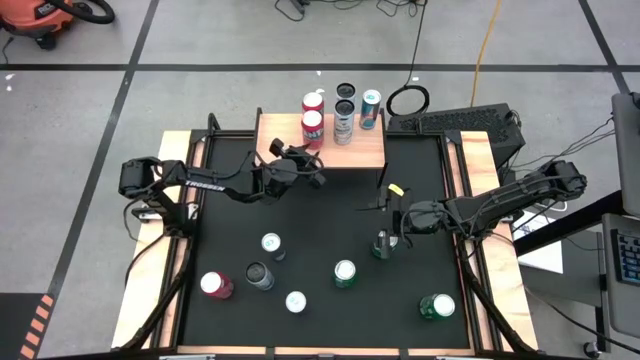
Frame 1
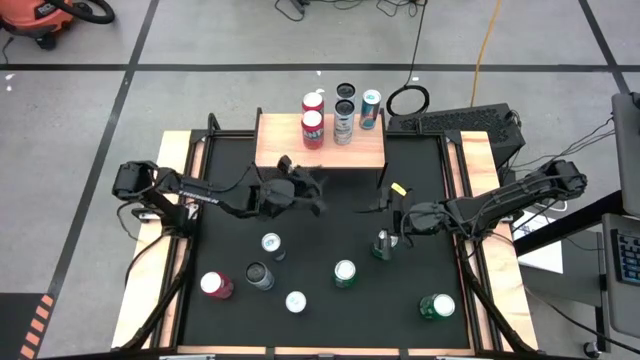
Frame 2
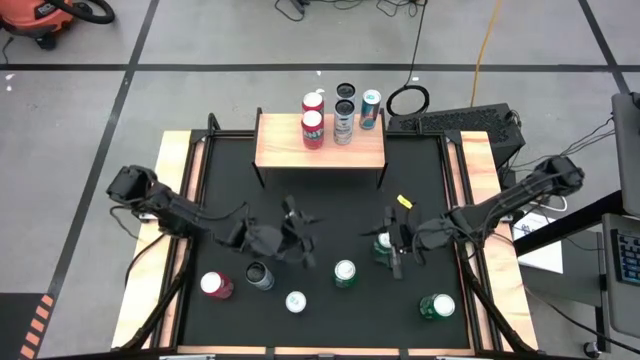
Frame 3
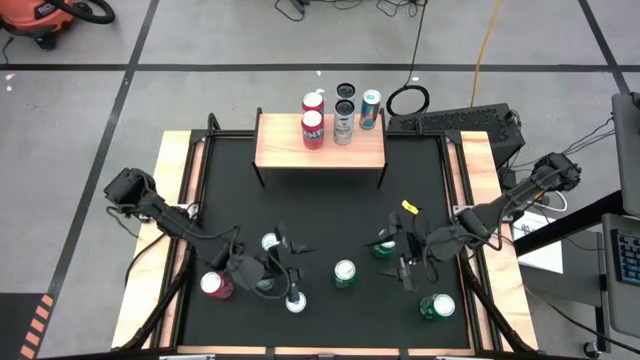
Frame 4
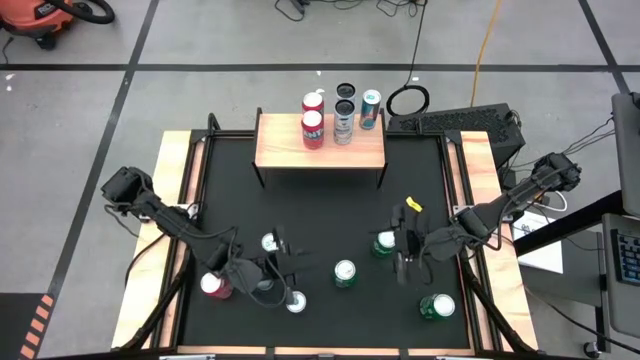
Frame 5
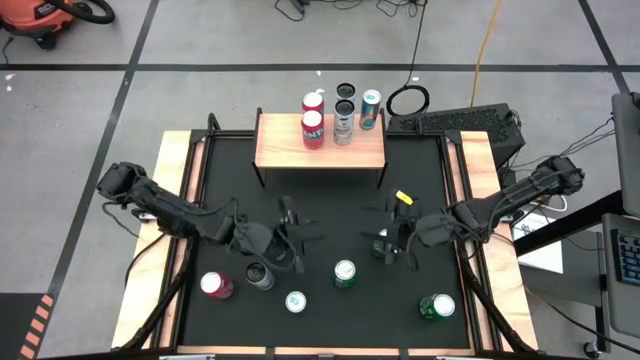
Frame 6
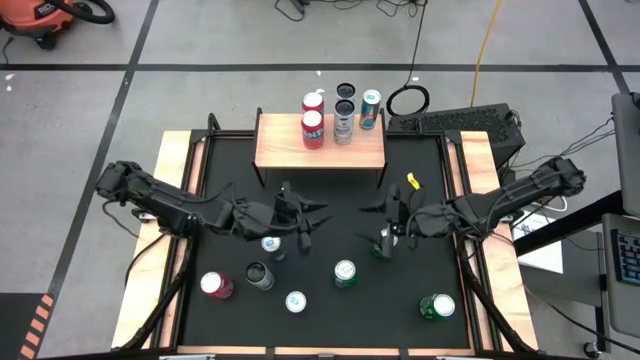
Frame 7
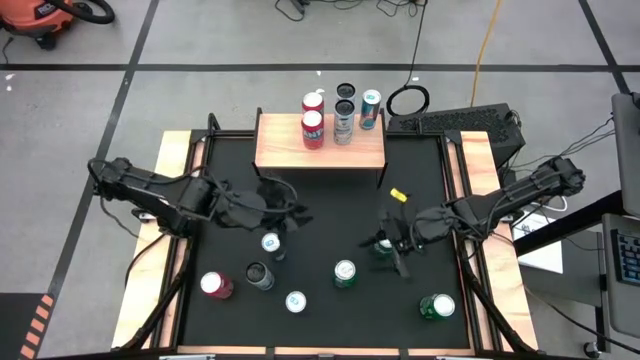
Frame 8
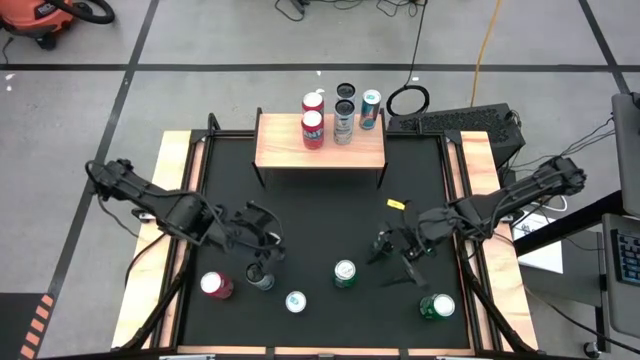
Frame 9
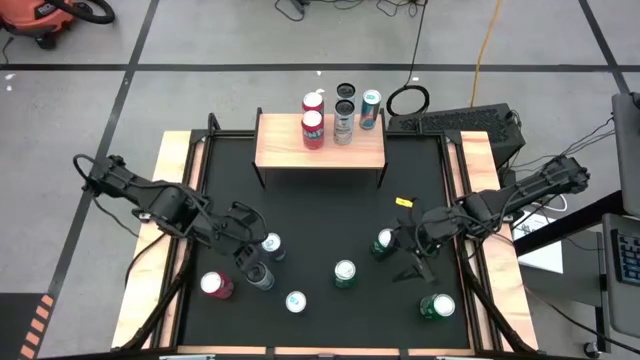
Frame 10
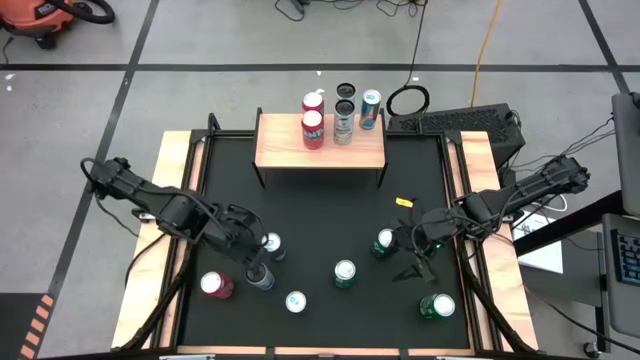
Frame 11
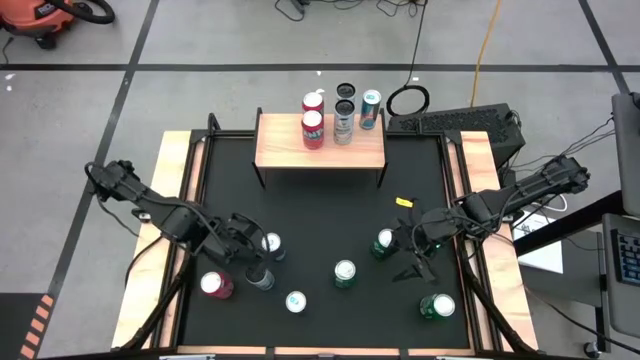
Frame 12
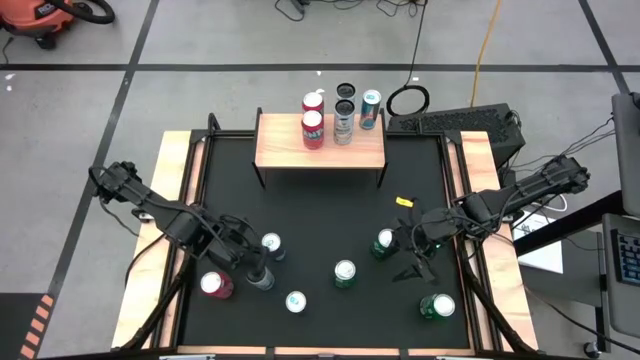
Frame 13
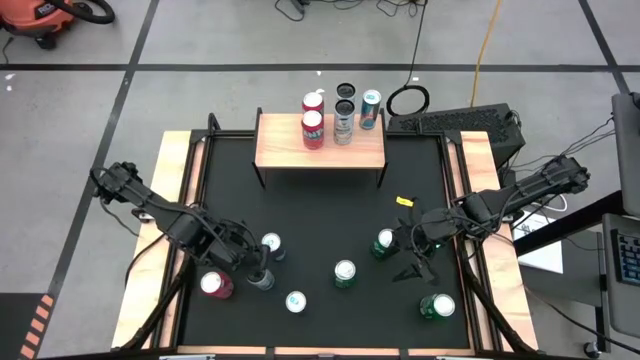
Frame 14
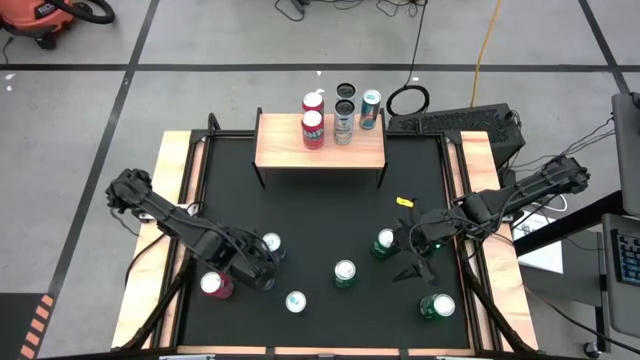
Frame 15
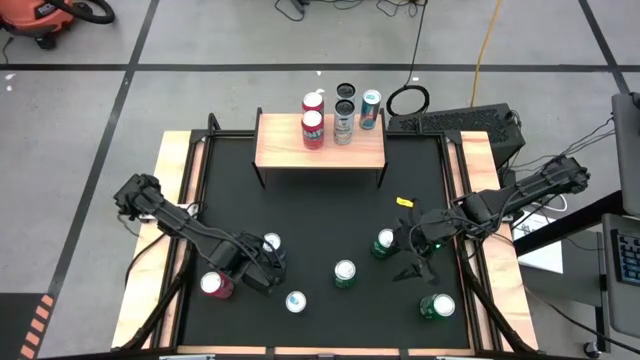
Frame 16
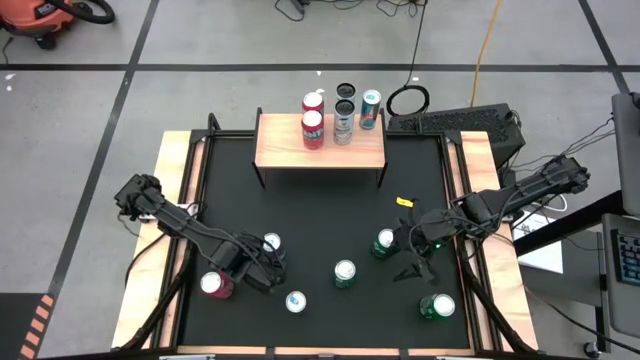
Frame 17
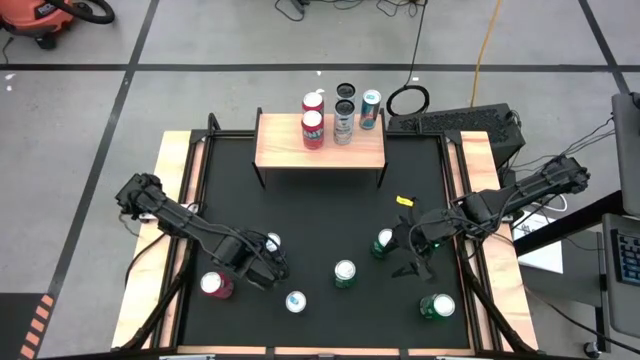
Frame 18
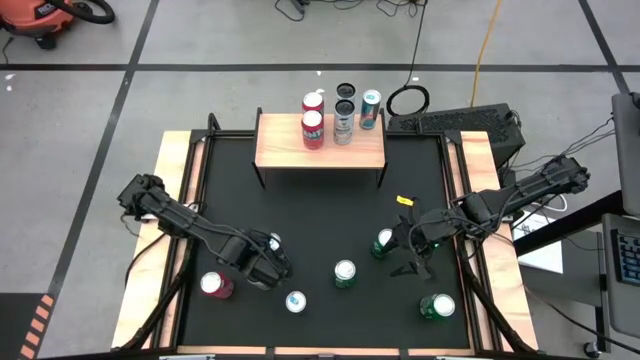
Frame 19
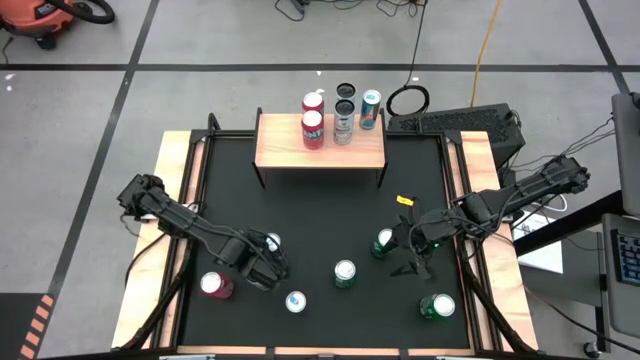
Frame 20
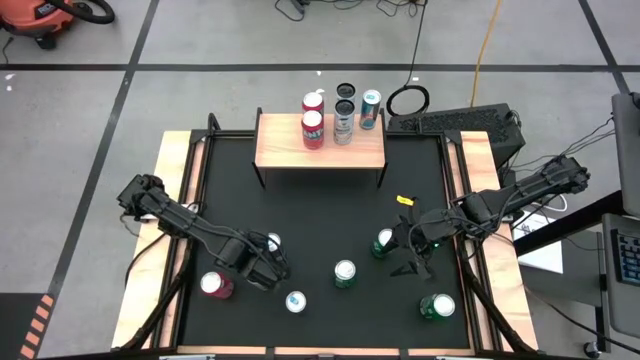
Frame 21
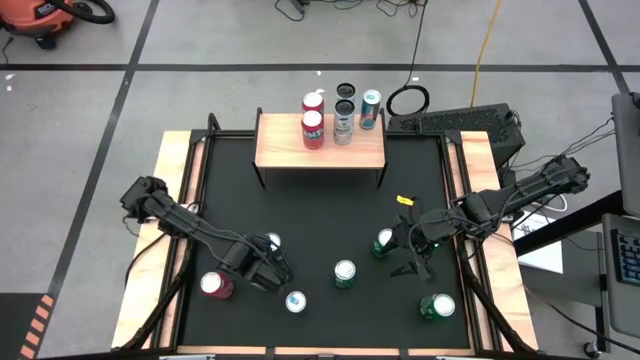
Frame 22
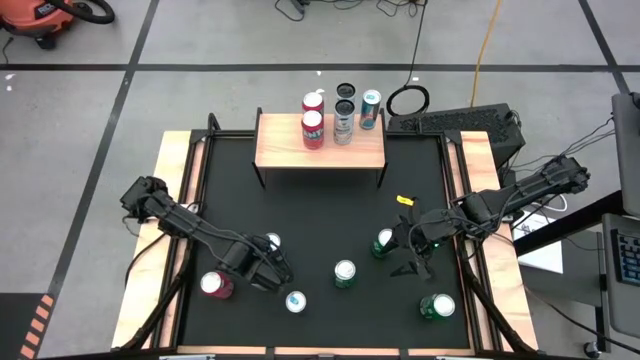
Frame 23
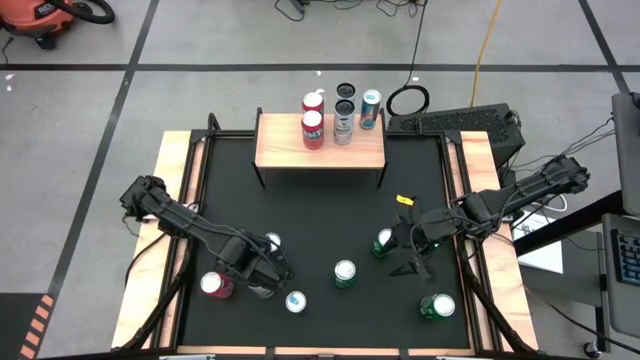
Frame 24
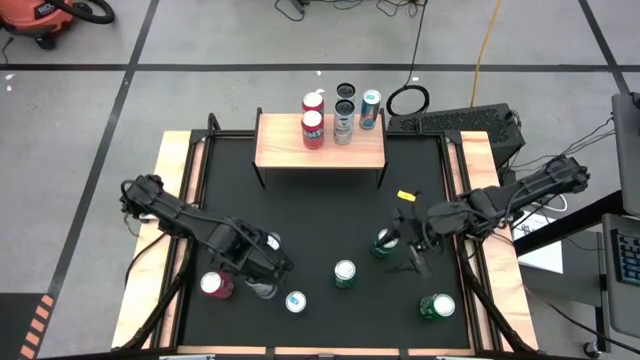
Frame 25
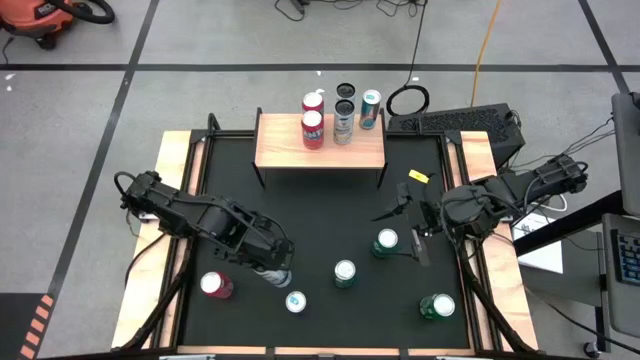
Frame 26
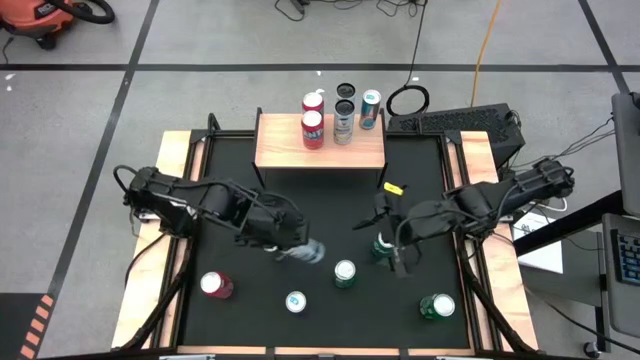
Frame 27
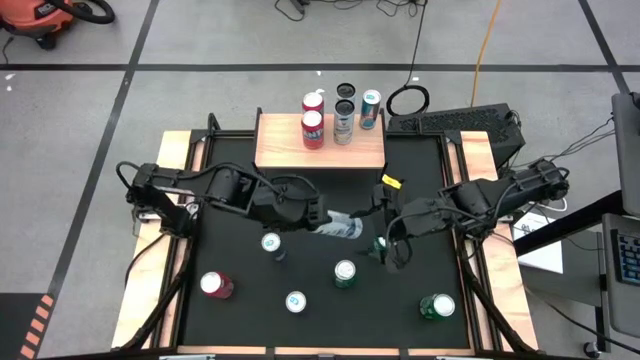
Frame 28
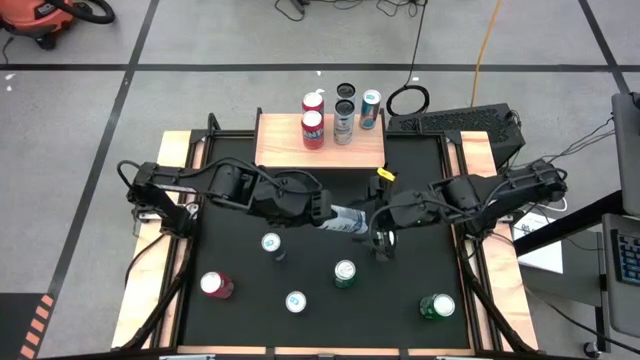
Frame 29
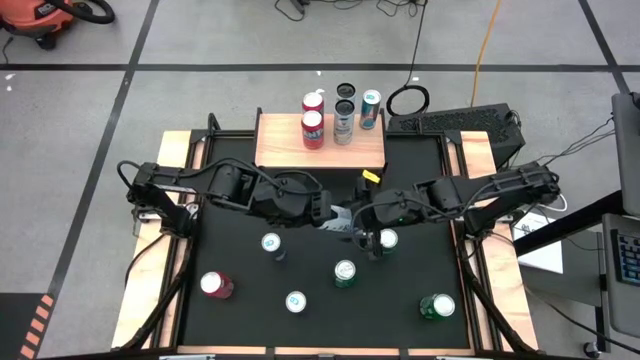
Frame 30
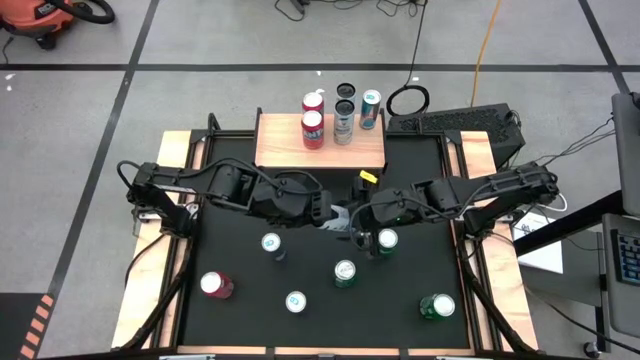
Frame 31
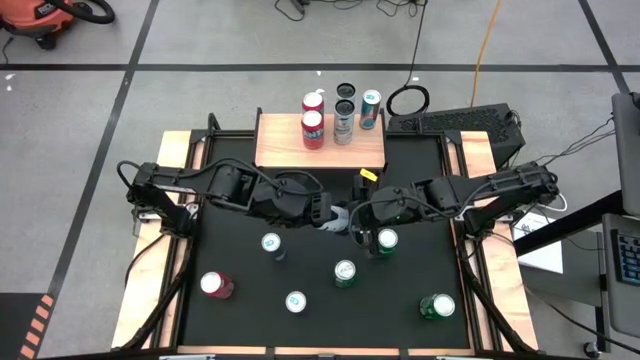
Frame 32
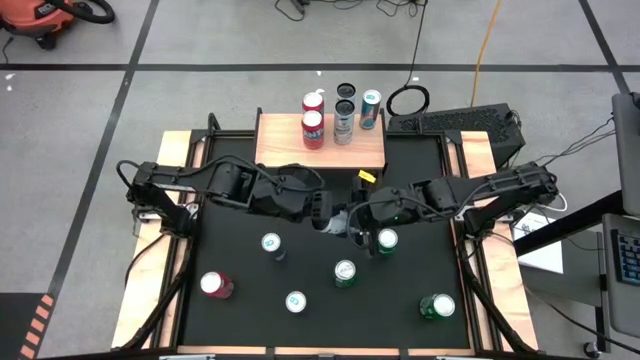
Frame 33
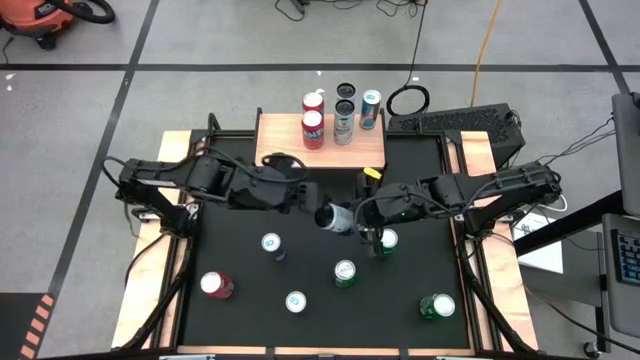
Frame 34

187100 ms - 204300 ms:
Task: Place canned beverage on shelf
Put the white soda can on the shelf aligned with the other white soda can

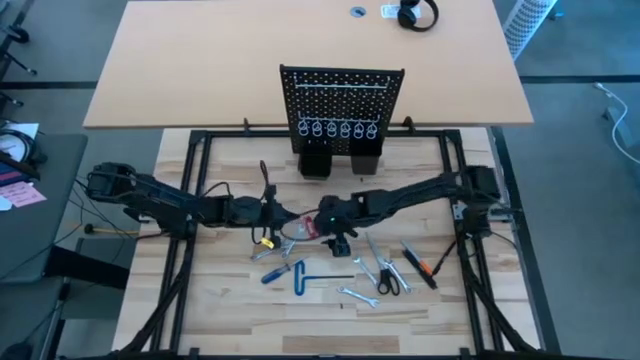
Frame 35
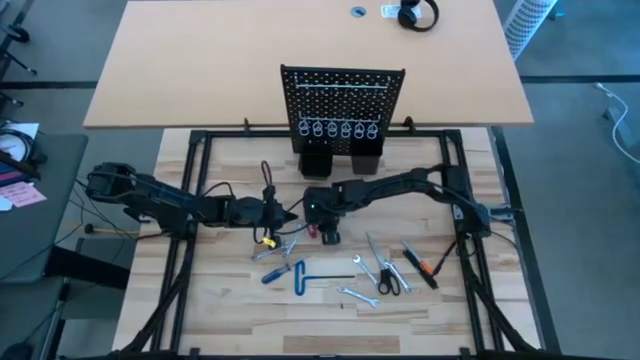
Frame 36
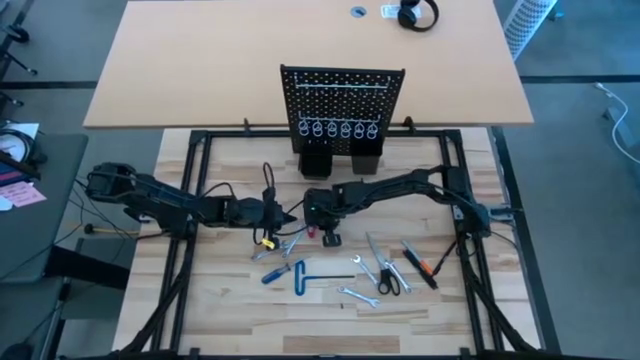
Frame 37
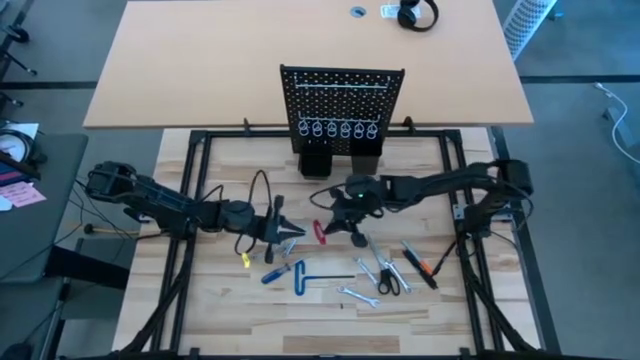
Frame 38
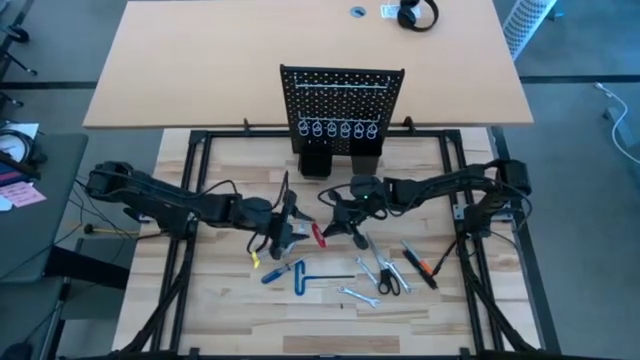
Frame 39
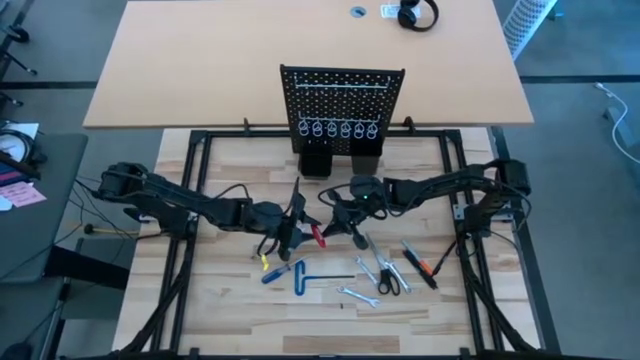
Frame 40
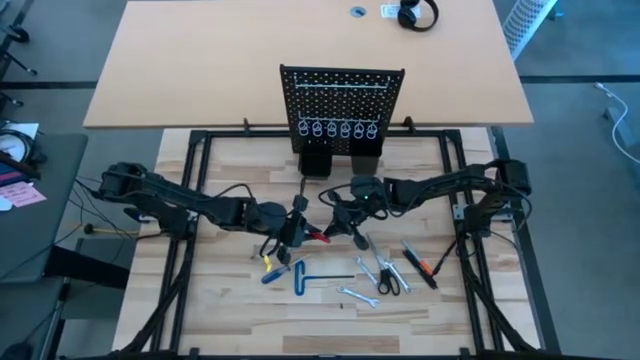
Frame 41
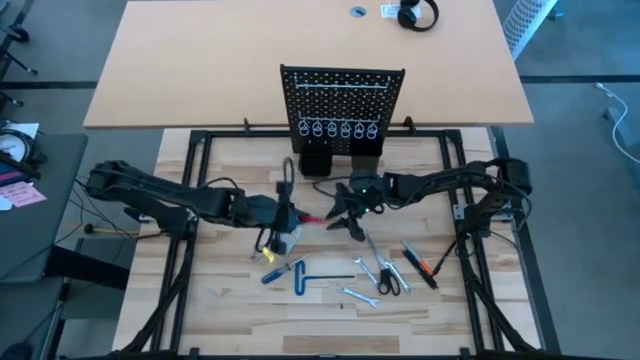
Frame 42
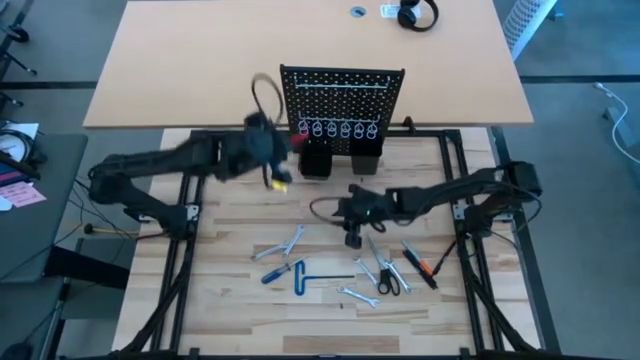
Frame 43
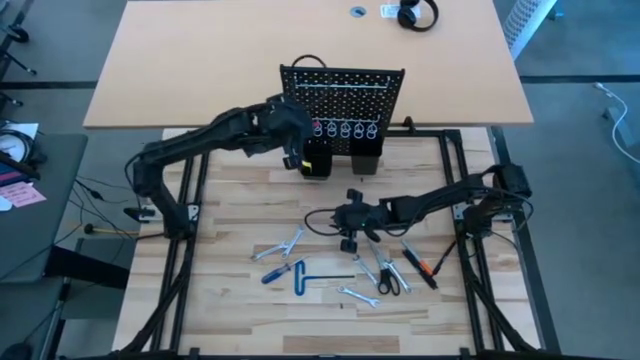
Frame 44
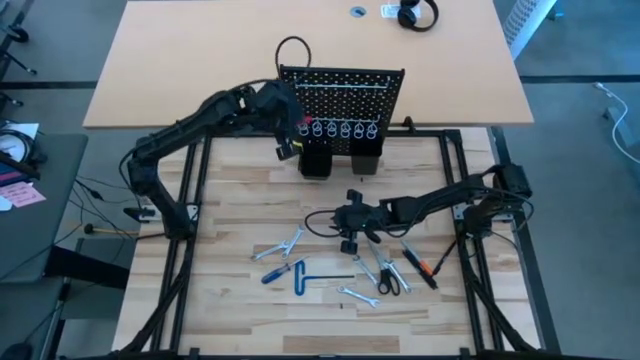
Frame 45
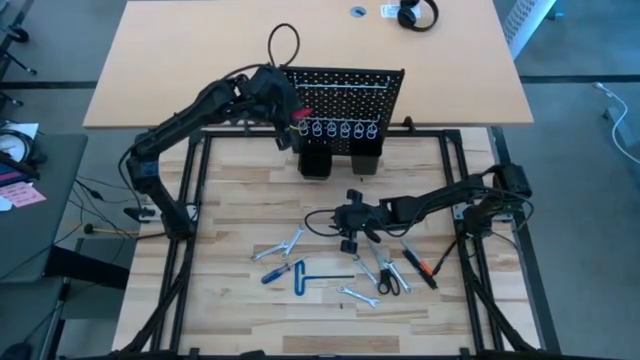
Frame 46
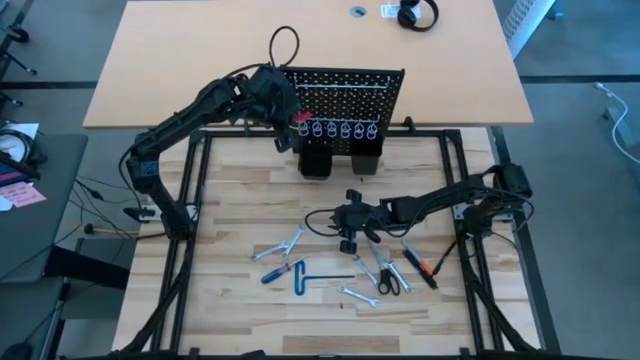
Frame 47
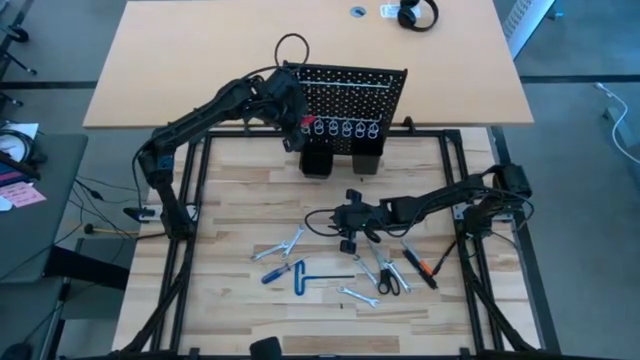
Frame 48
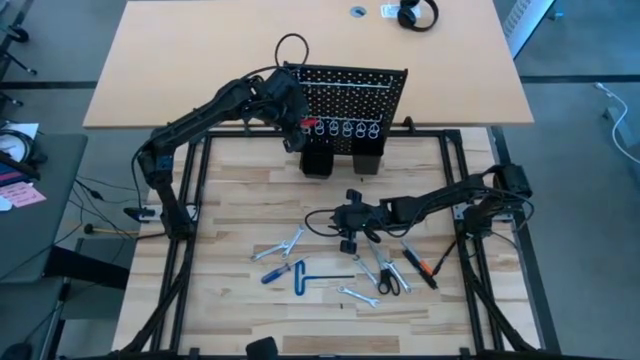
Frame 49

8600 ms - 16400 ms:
Task: Hang tools onto peg board
Hang the red T handle allen wrench on the pegboard
